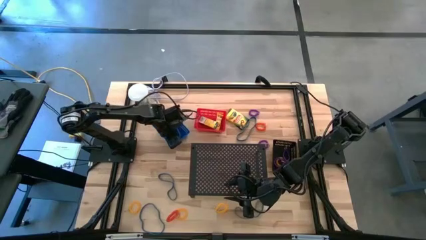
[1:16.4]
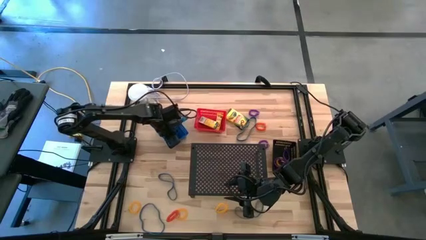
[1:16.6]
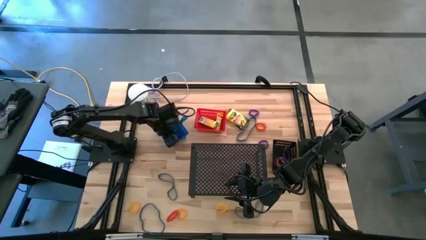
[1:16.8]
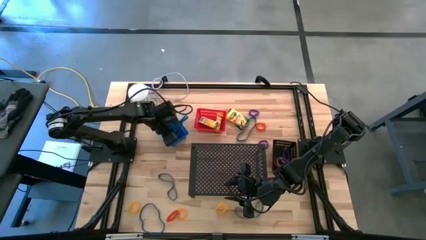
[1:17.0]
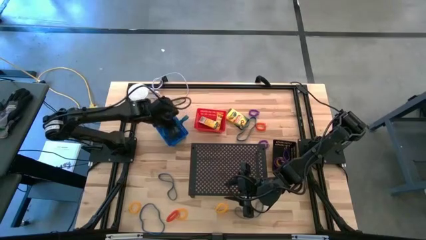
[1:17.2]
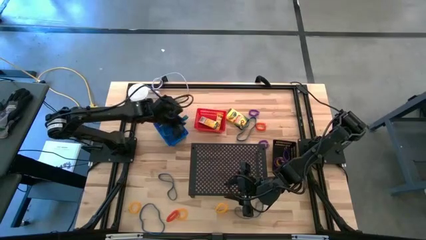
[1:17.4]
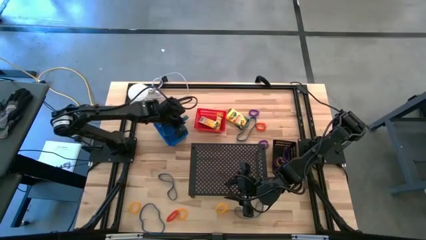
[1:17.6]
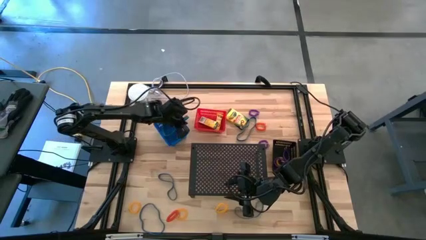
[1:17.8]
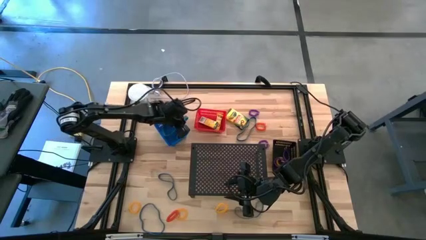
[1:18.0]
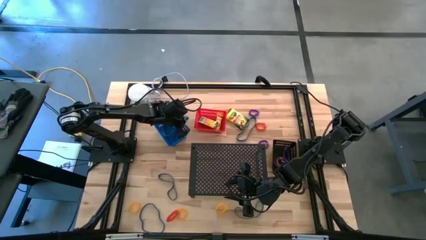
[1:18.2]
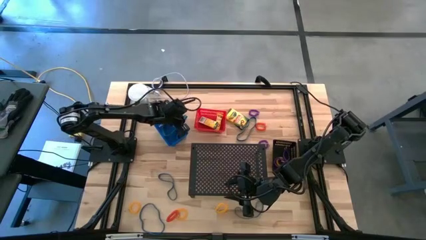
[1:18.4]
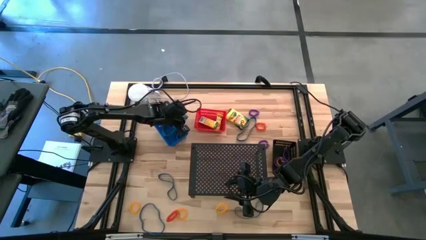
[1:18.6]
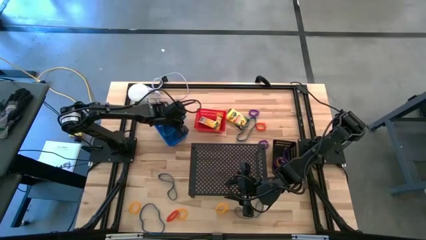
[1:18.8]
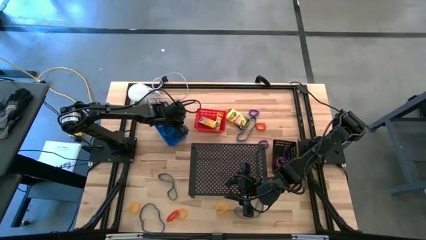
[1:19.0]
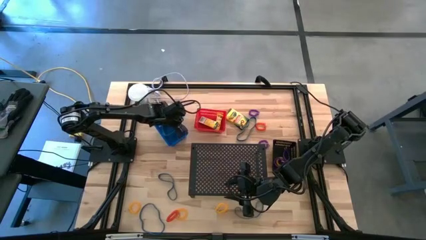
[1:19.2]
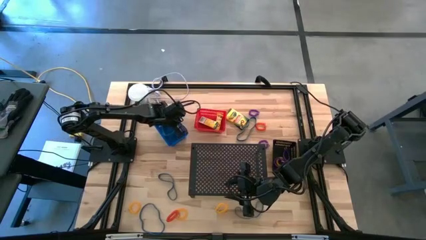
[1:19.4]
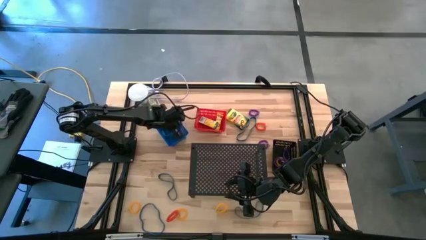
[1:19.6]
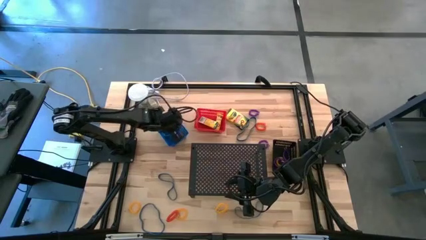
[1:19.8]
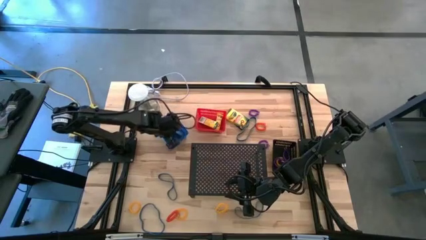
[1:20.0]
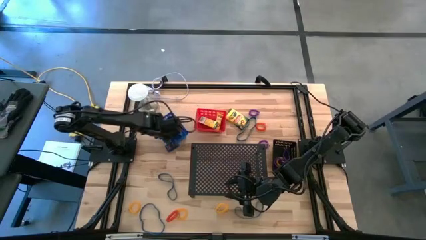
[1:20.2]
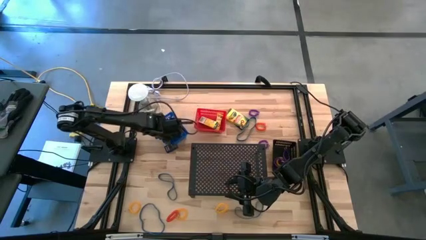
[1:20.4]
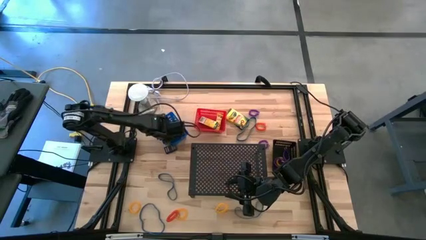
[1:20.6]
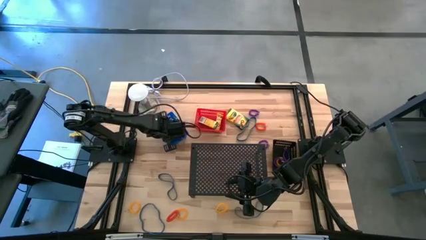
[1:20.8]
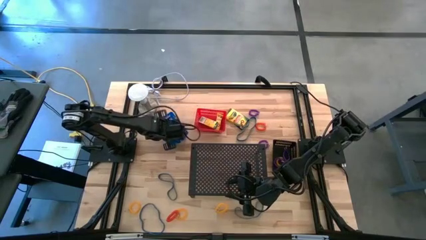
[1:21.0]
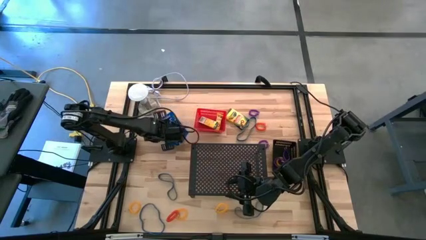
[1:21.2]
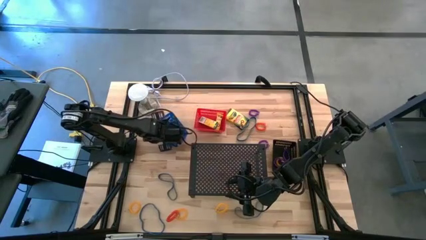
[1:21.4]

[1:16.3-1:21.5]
Task: Pick & Place Office Desk Supplies
Adjust the blue rubber band in the blue bin

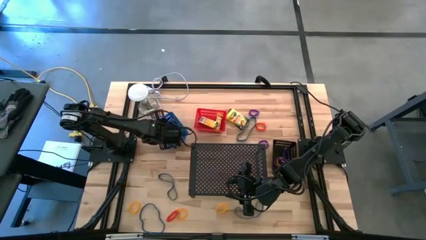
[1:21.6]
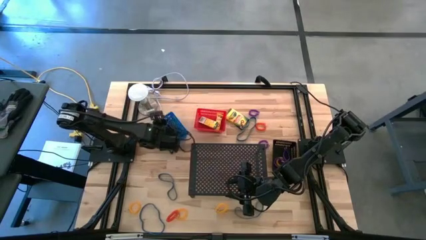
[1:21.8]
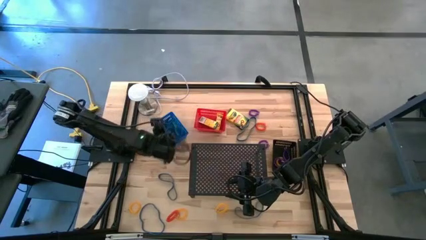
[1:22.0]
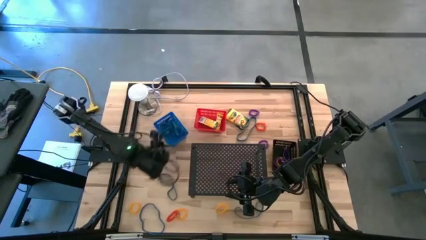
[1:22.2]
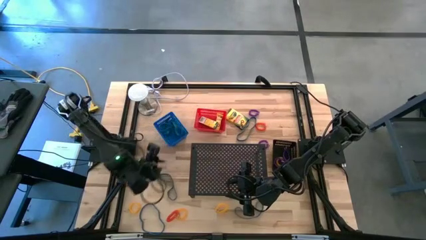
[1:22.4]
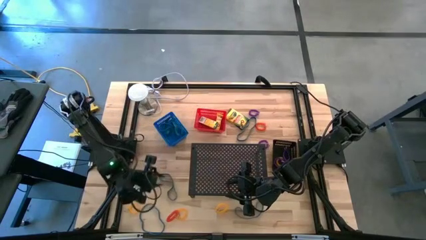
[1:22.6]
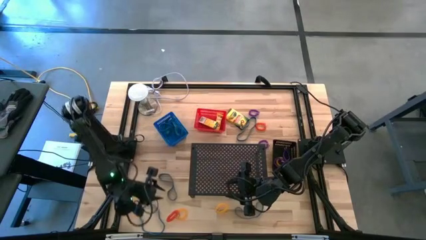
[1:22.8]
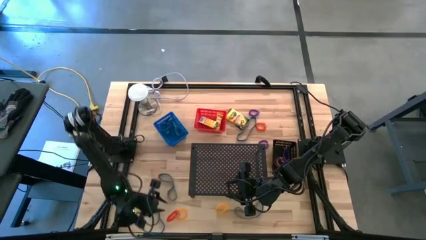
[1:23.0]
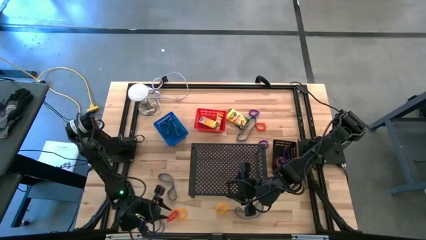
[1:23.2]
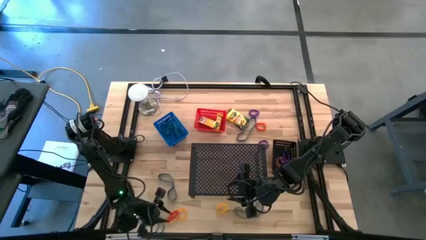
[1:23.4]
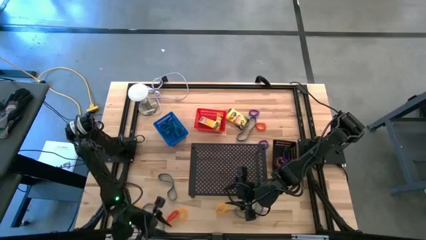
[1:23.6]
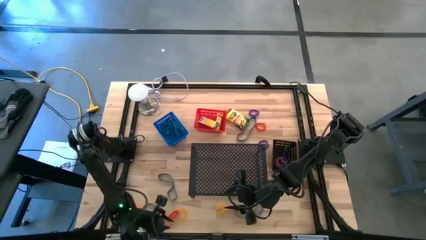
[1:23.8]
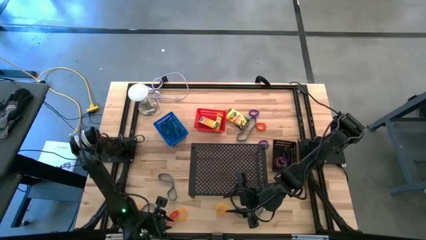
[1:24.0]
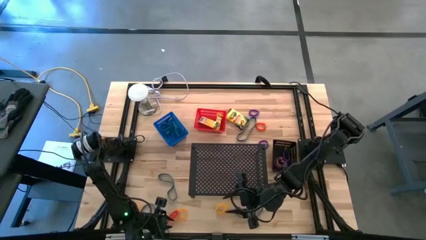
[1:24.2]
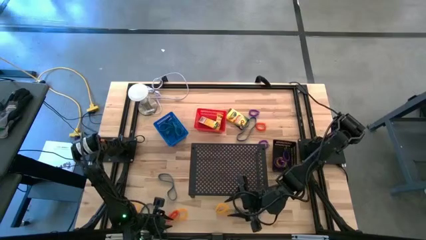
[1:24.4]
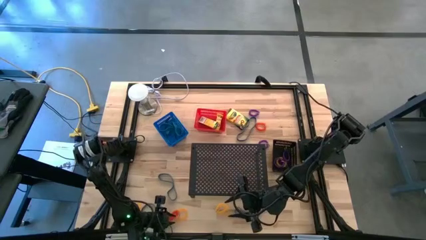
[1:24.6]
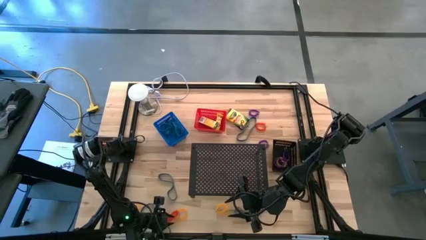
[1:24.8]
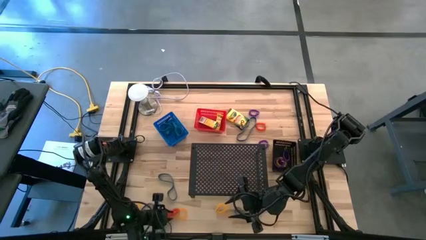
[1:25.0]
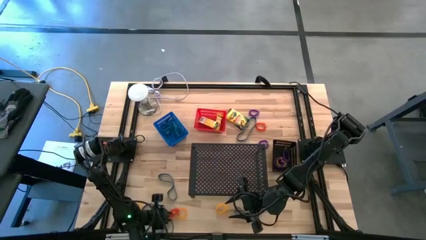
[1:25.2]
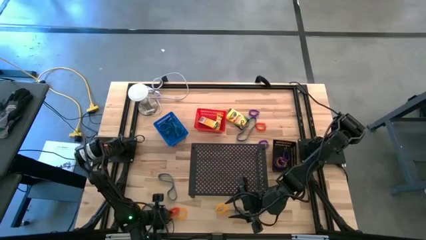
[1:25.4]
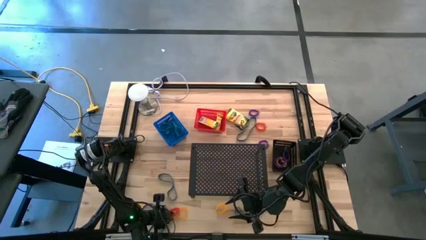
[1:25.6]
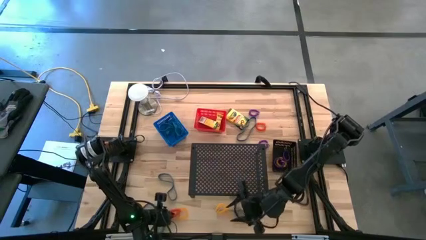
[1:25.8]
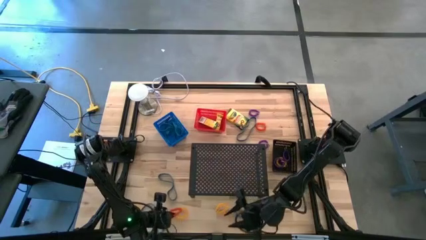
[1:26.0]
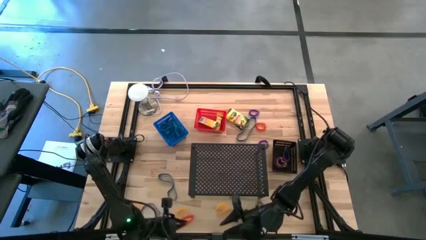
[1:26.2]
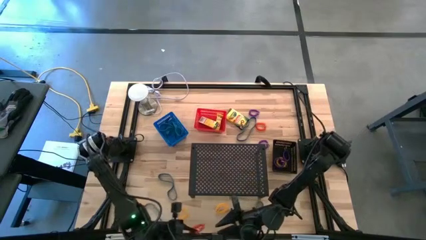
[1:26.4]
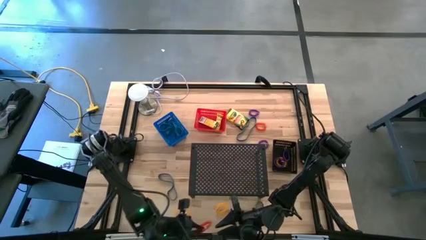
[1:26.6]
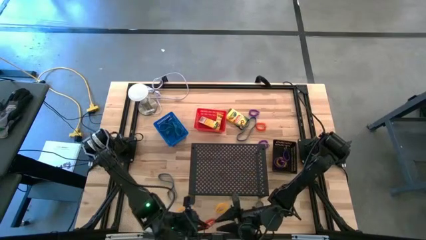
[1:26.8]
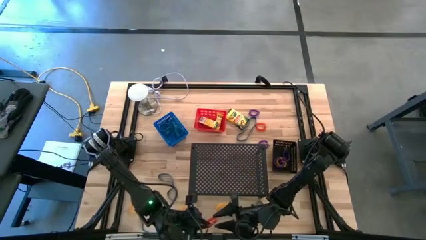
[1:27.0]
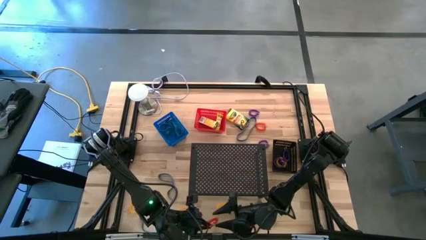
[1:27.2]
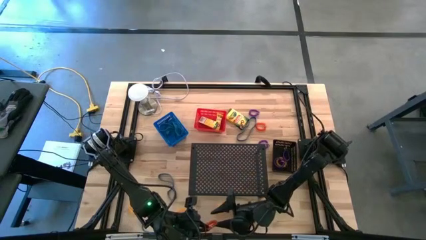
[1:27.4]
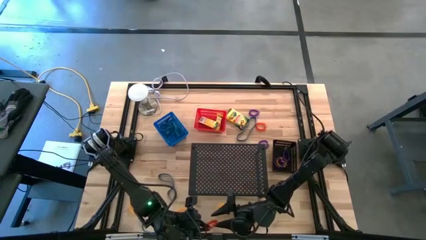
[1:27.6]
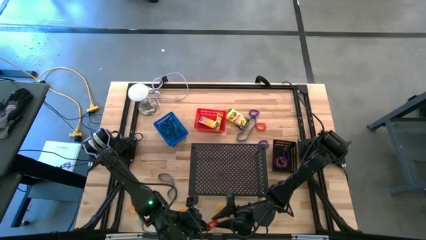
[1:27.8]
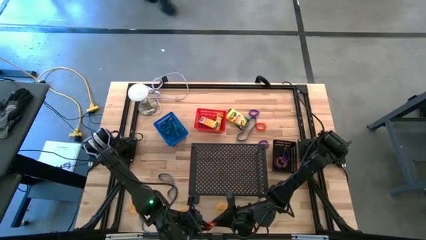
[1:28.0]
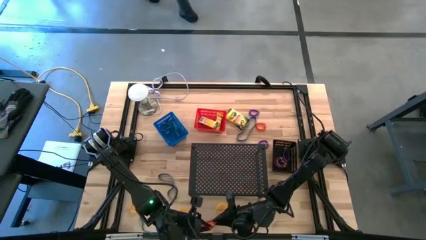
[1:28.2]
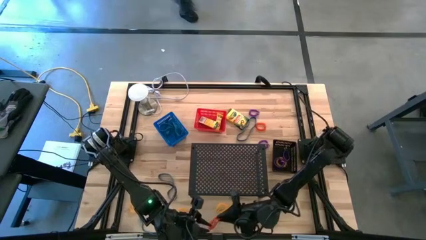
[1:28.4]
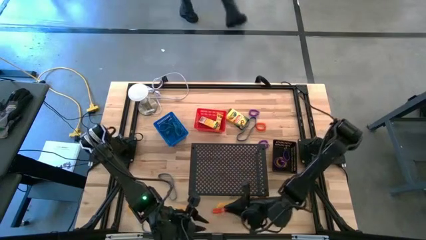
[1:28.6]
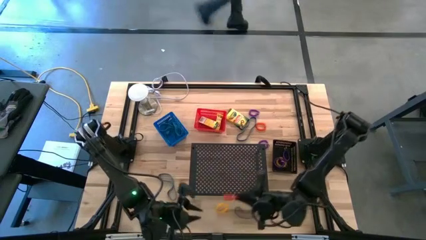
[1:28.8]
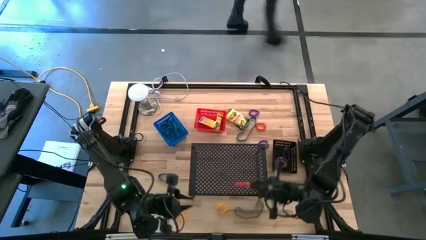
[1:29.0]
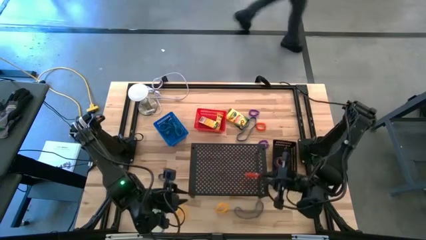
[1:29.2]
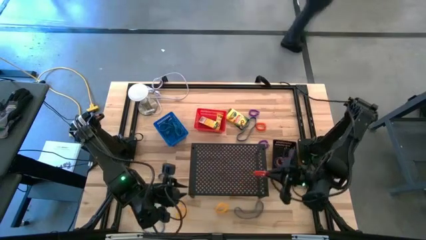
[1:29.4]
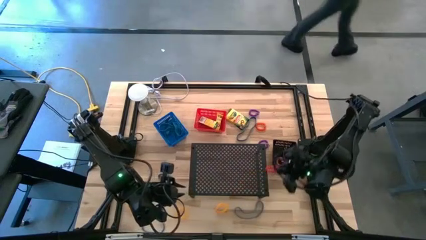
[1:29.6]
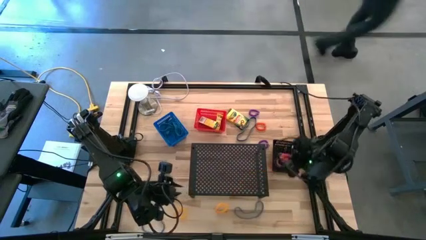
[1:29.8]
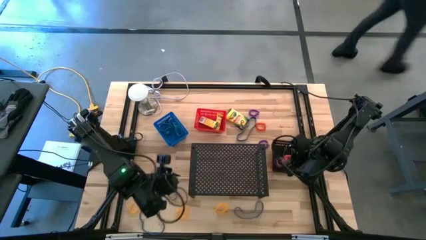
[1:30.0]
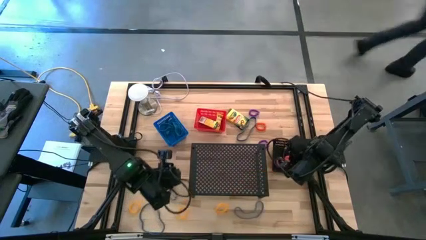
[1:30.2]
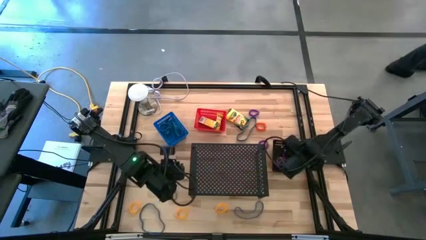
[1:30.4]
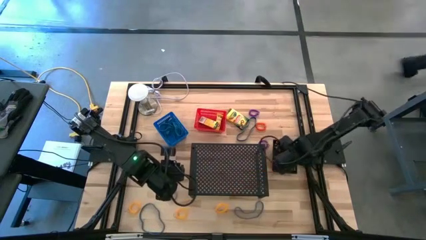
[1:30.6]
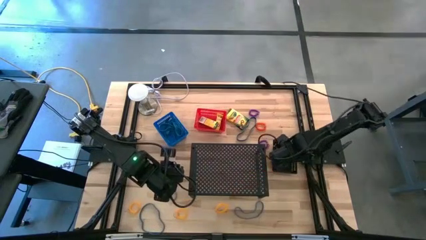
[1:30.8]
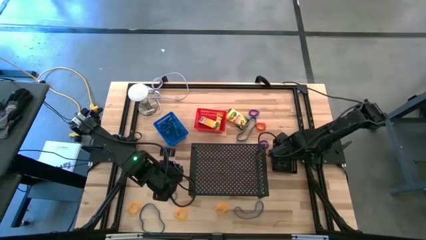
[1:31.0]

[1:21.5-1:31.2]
Put the orange spring keychain into the black bin
